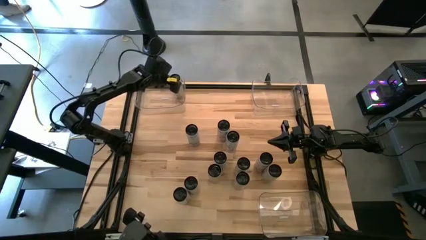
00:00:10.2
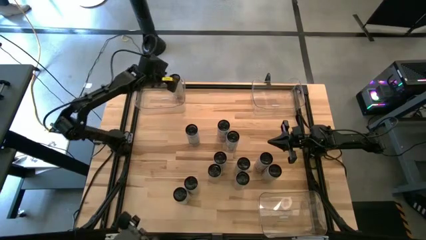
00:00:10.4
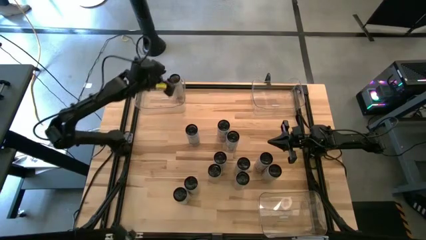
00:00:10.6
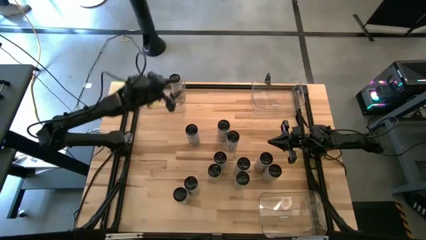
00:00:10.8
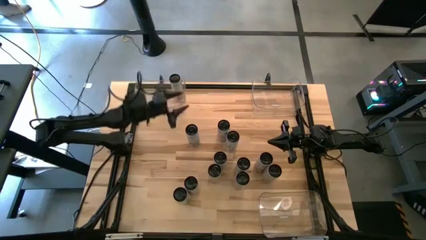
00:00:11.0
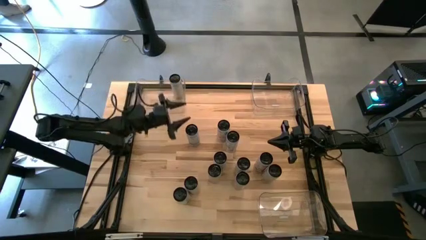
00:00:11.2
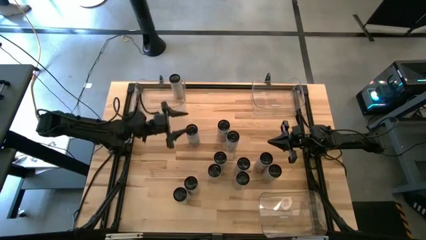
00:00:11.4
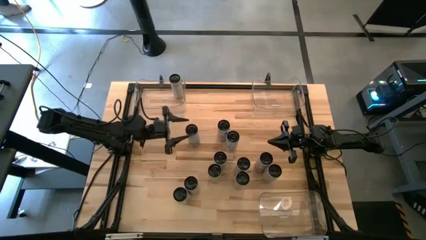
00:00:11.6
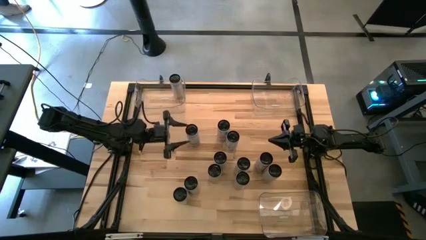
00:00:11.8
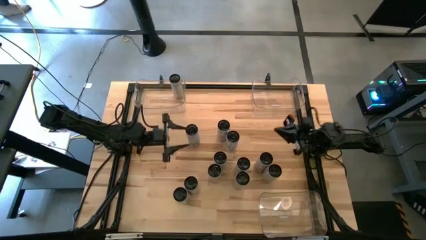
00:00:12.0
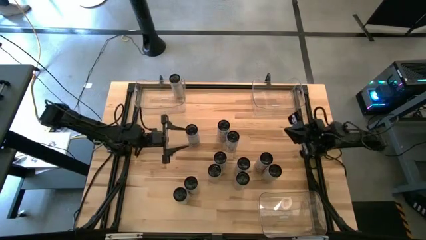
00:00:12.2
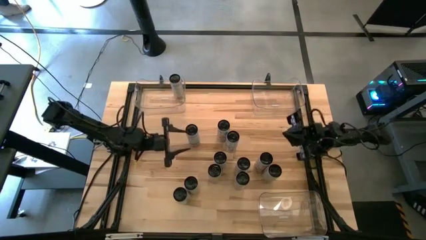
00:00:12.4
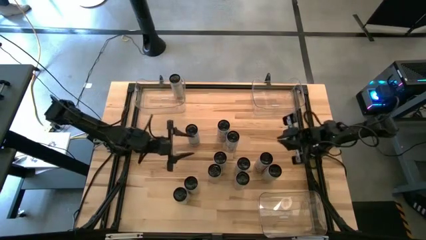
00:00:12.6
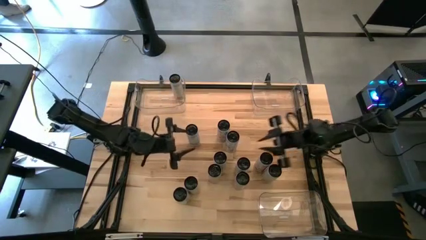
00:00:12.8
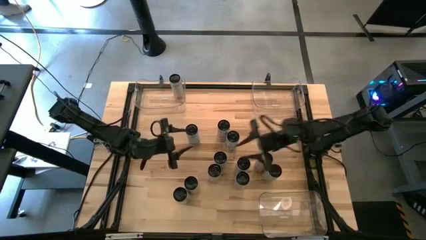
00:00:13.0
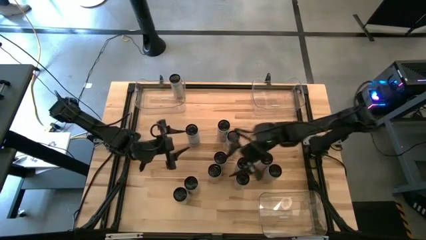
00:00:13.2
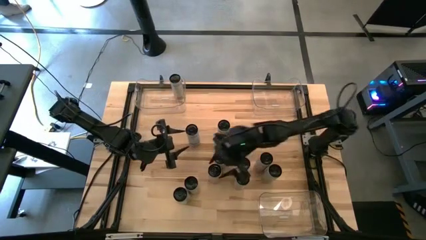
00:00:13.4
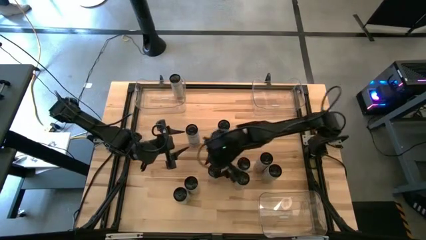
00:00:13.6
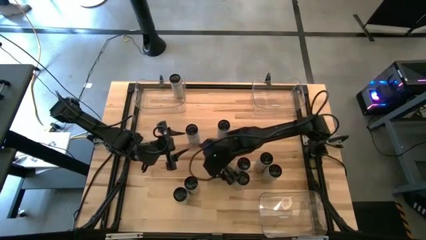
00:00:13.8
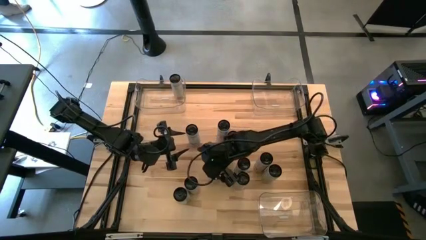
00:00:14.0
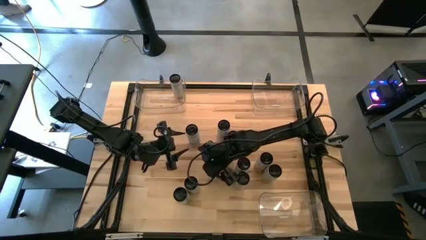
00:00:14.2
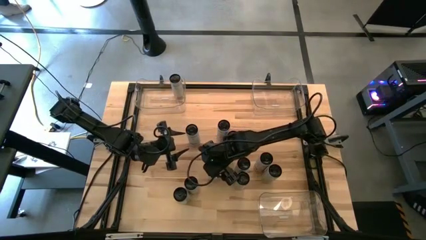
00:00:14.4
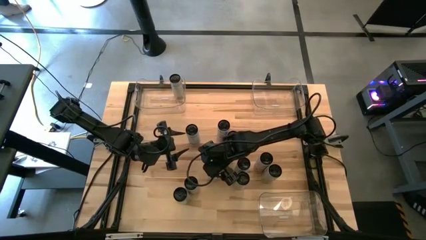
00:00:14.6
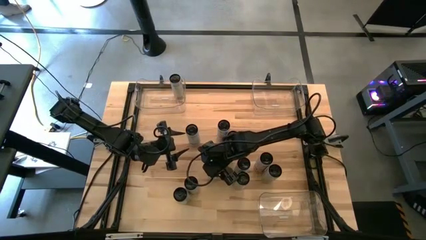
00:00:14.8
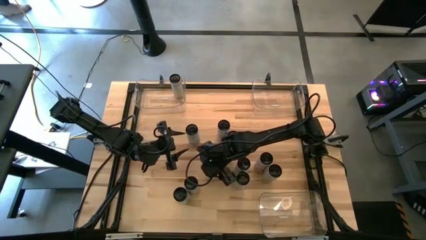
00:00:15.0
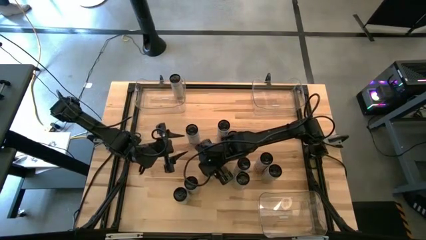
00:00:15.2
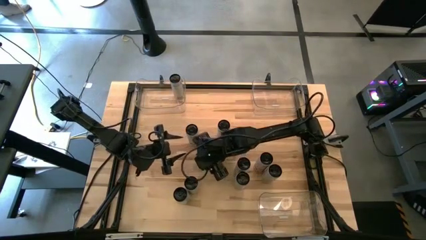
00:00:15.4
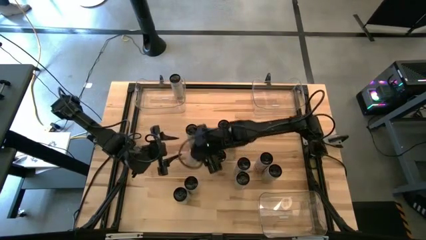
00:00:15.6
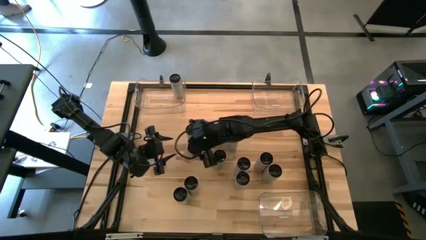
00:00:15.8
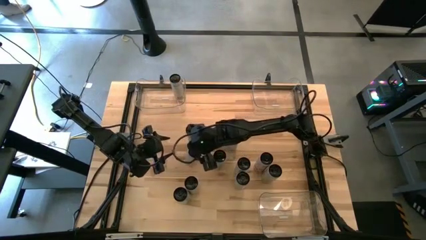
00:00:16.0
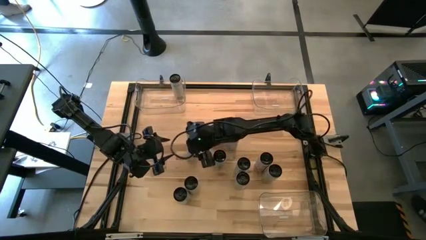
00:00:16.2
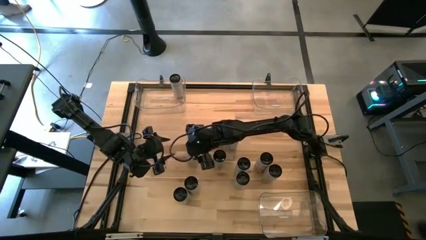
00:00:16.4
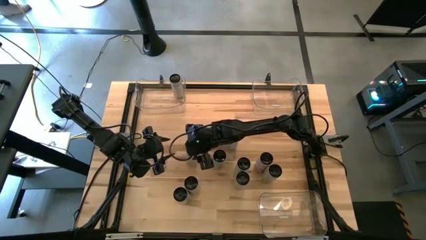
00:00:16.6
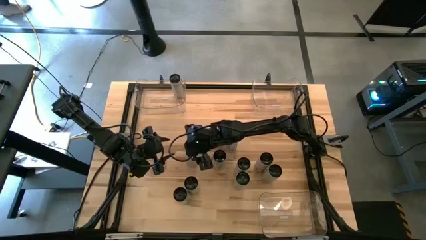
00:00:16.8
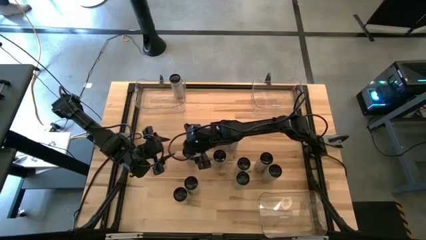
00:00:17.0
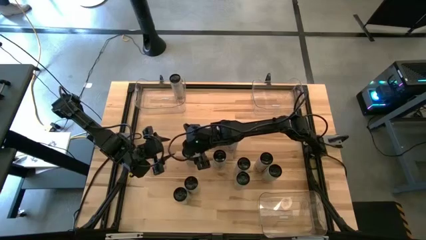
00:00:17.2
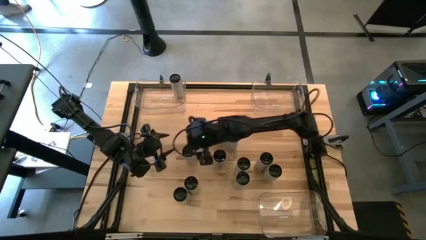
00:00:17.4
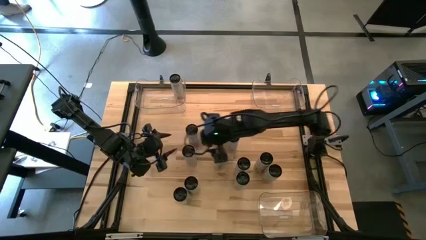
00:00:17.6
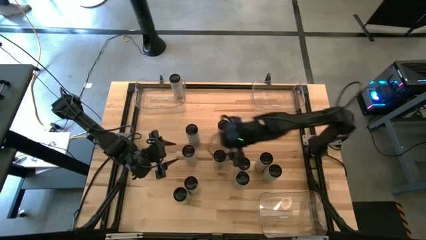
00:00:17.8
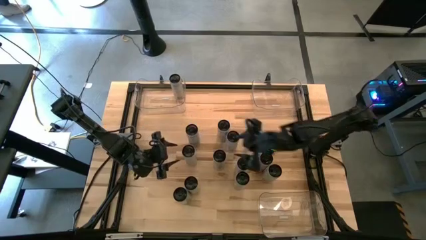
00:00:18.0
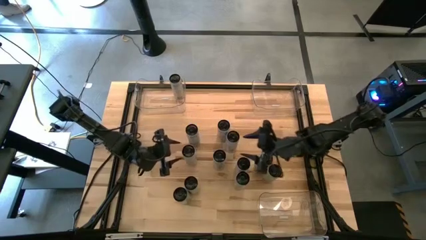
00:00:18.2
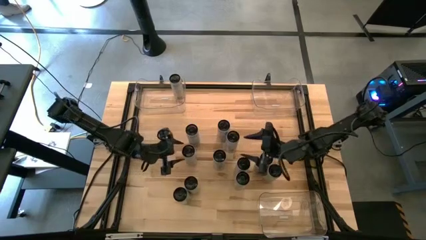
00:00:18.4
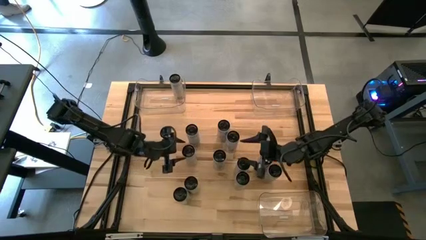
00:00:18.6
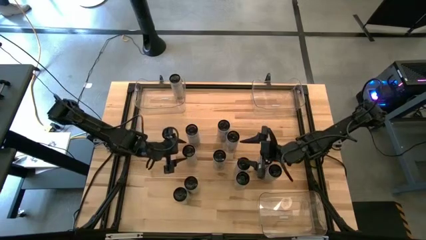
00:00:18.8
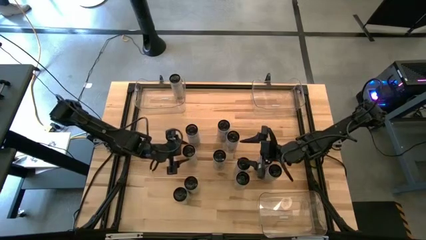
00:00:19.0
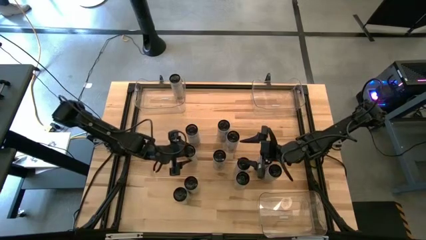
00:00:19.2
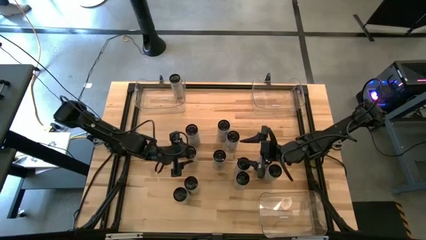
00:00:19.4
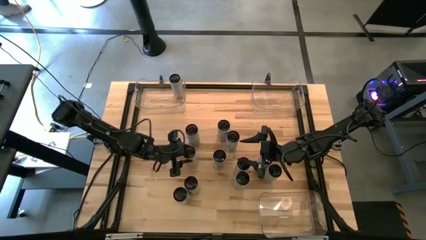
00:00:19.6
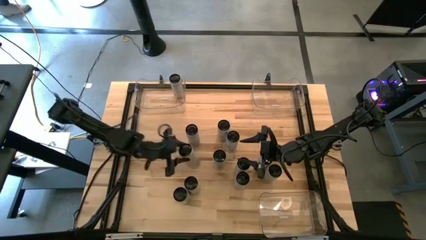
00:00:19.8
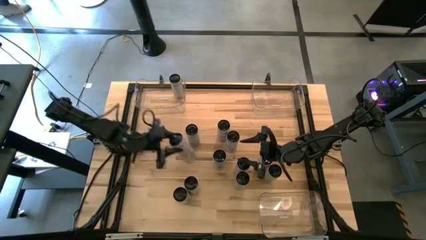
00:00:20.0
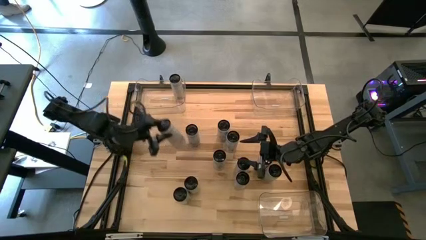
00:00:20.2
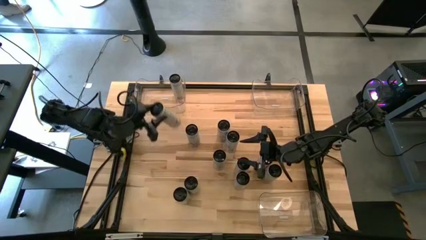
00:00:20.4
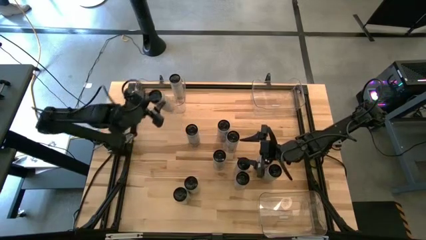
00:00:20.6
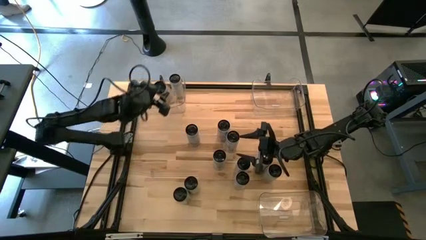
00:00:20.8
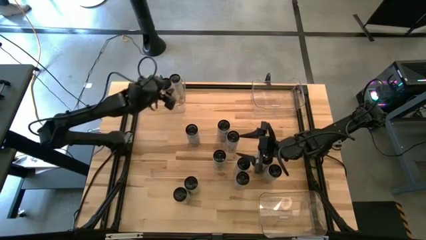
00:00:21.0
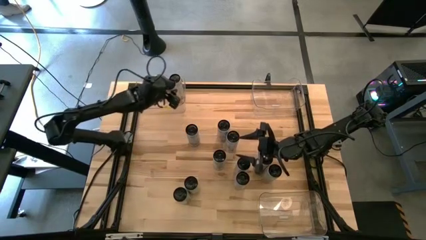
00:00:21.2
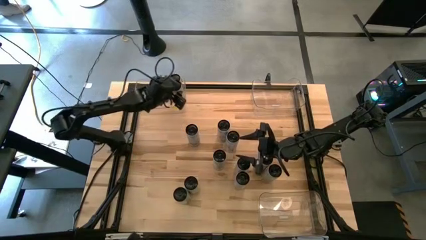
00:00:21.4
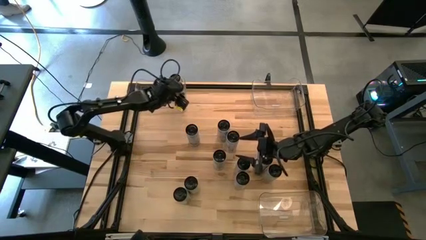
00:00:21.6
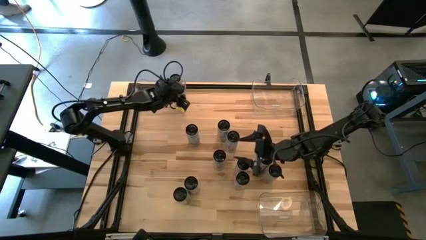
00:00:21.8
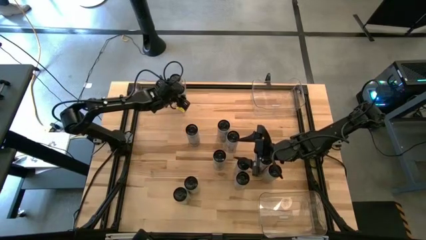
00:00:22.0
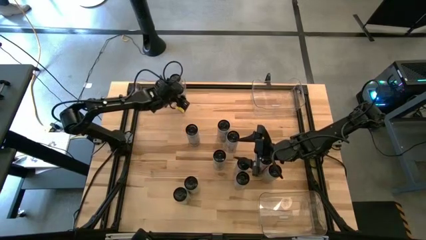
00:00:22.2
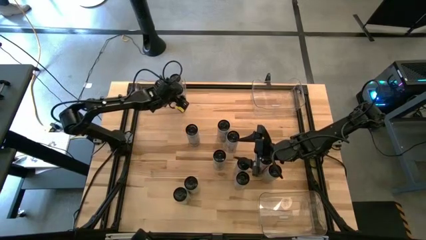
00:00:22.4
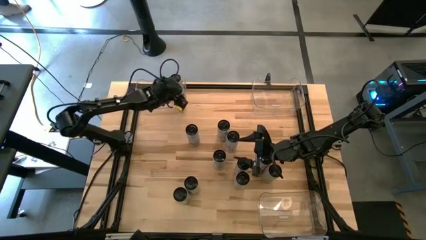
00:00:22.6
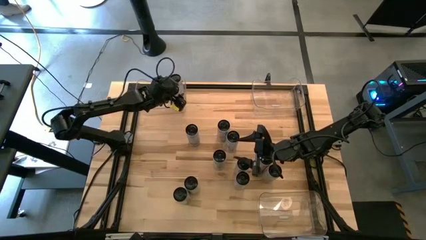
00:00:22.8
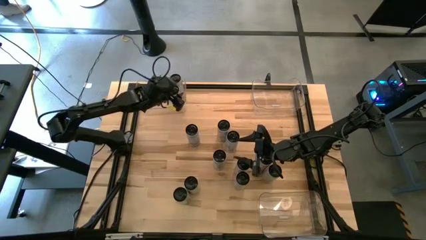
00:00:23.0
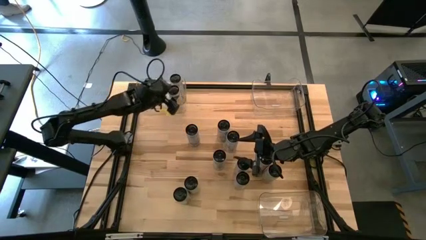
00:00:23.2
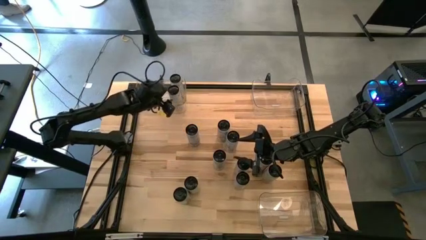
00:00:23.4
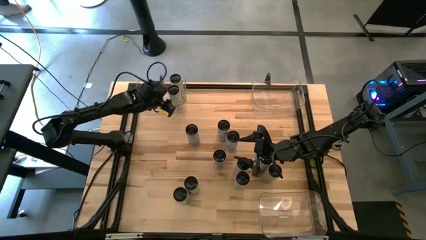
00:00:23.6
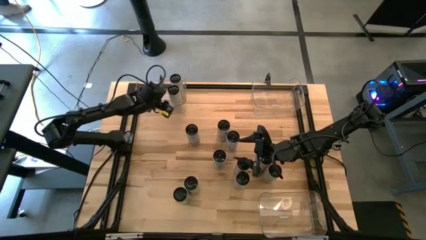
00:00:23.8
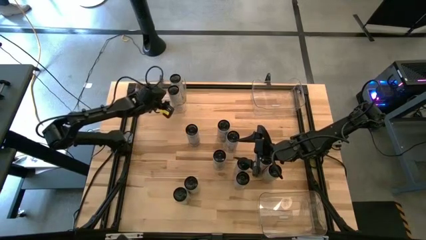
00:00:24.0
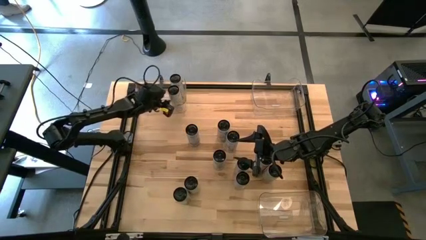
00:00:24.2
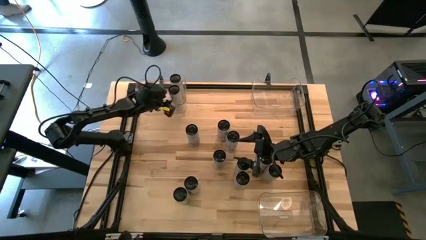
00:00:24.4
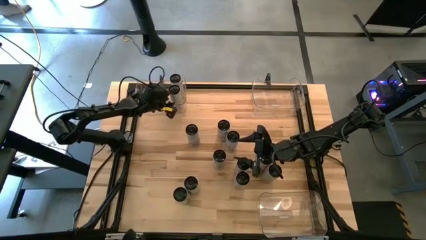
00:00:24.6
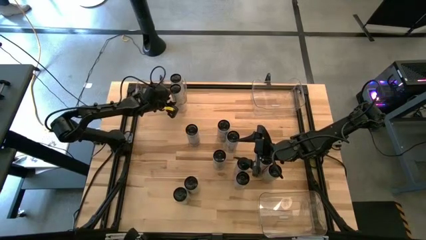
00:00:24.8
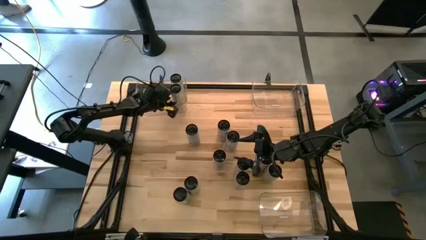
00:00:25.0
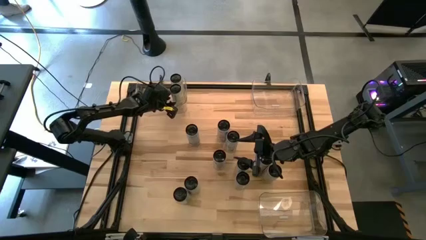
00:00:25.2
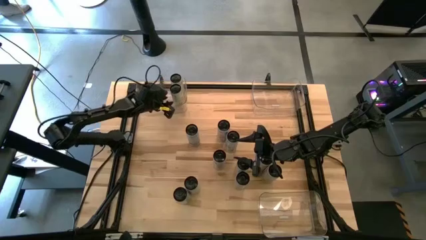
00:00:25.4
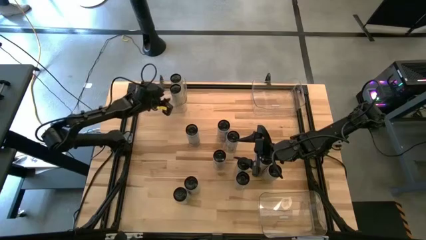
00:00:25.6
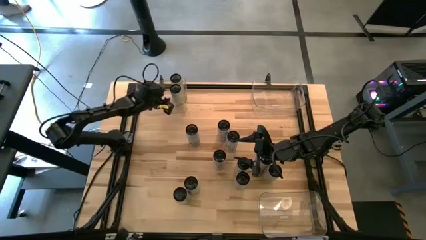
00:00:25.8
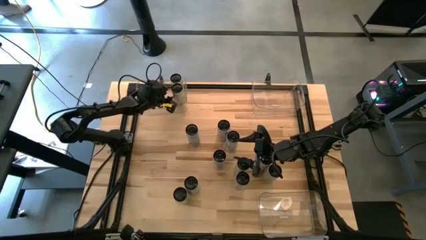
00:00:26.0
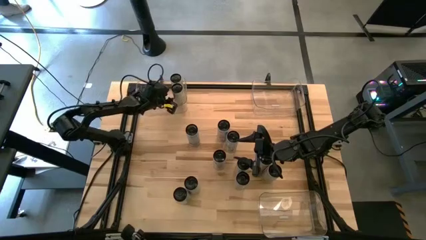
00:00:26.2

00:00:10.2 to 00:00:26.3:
Task: Sort soda cans
Put the white-yellow soda can into the top left transparent bin
